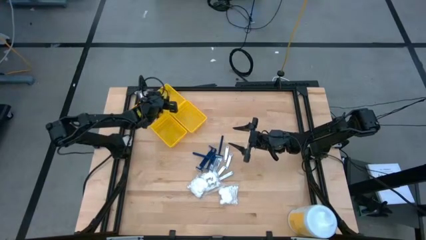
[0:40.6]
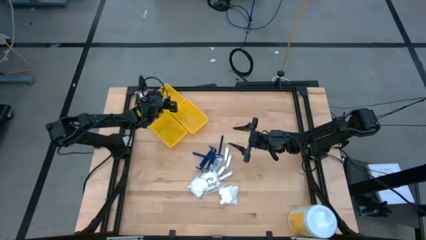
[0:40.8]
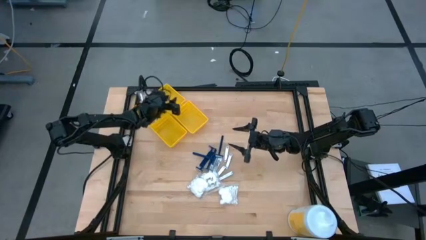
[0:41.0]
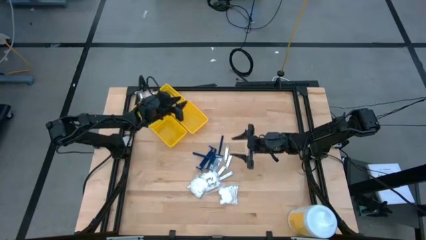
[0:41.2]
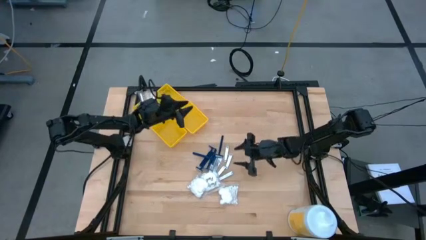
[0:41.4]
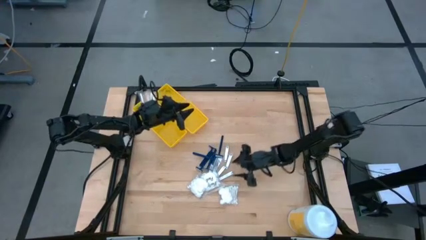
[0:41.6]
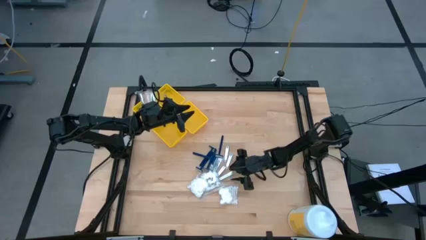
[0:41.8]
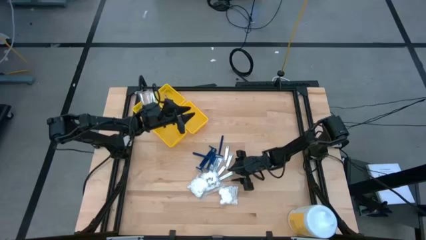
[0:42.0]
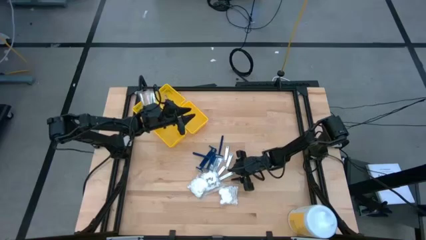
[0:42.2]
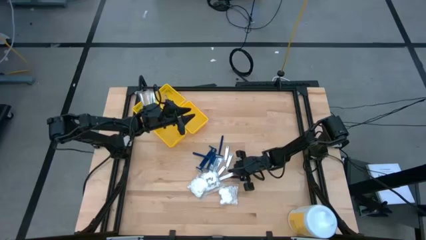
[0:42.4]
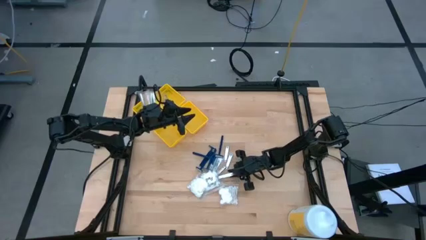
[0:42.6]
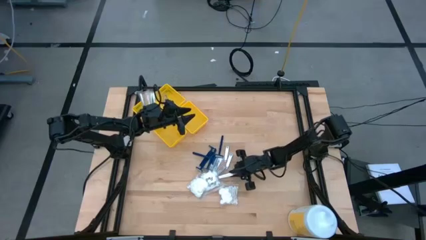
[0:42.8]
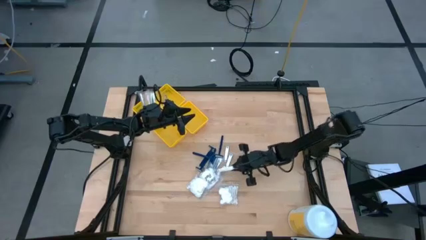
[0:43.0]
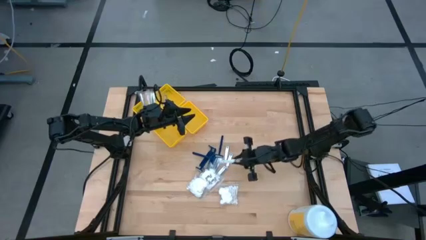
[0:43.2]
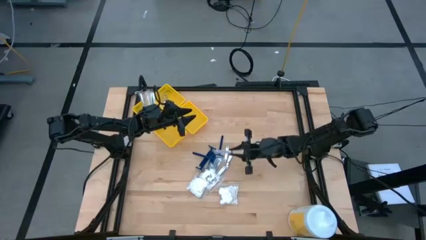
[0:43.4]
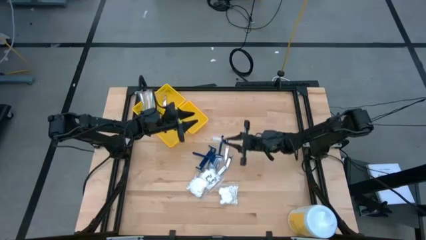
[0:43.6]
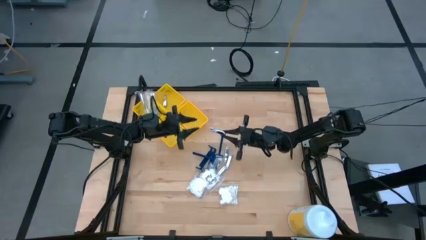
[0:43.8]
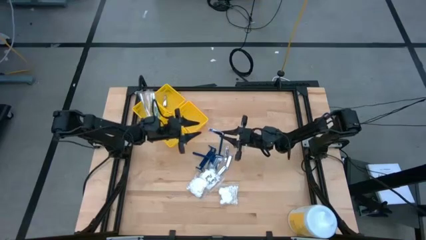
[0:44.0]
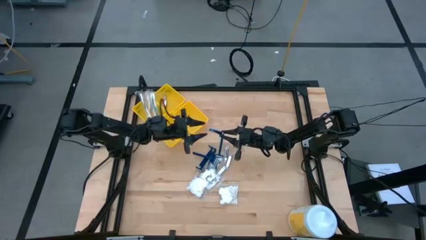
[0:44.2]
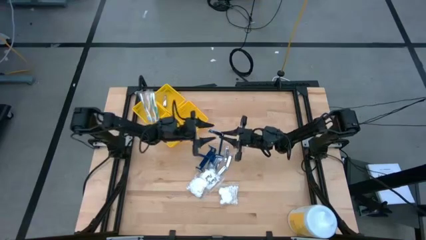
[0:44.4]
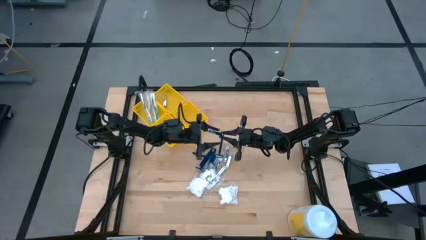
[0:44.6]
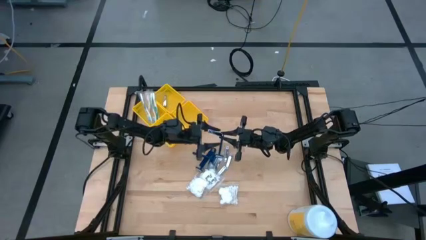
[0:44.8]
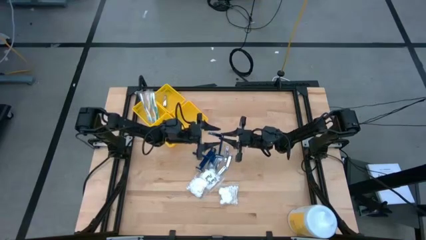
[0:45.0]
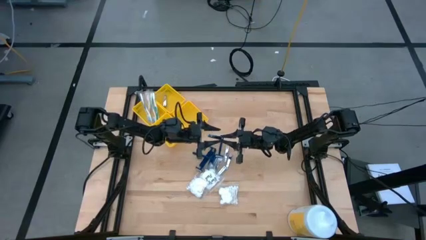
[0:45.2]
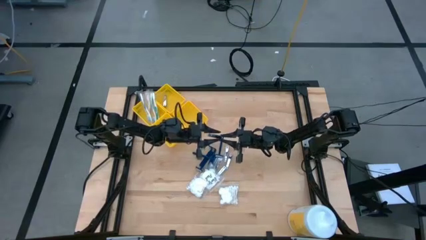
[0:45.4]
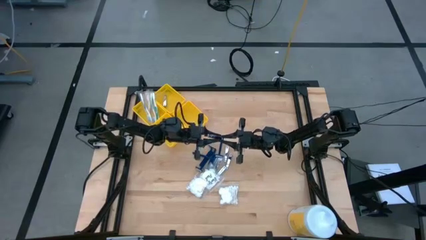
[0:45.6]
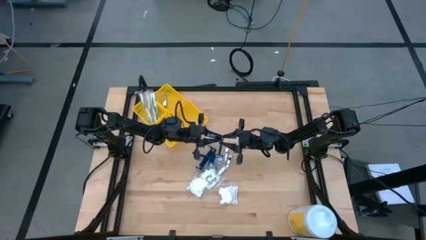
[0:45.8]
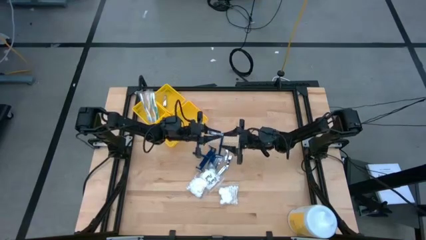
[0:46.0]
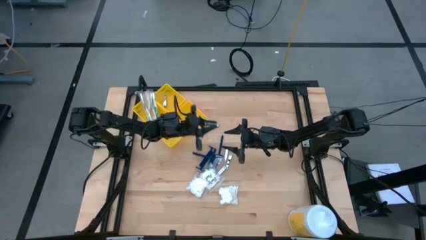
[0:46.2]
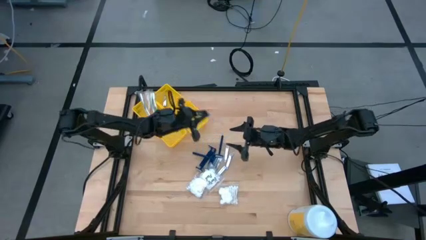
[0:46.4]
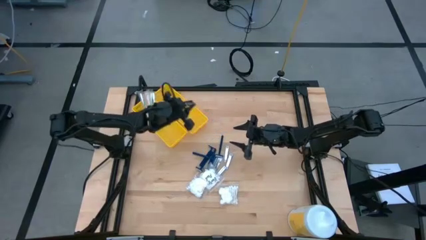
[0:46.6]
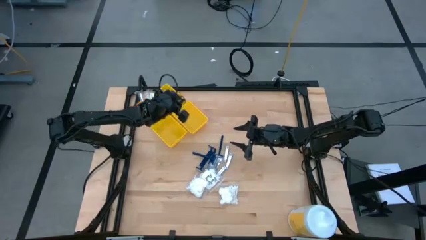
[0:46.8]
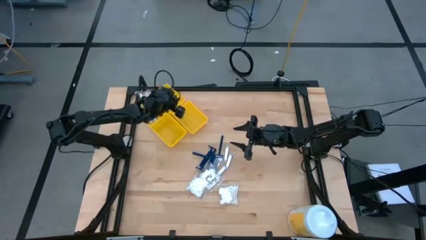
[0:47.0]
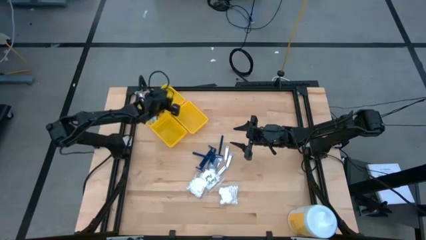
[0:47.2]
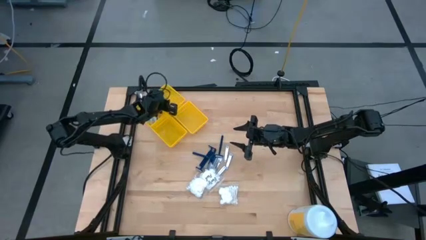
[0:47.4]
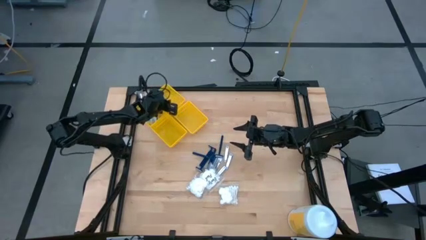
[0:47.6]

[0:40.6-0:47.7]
Task: Pick & Place Travel size toiletries
Put the silver nail cutter into the top yellow bin

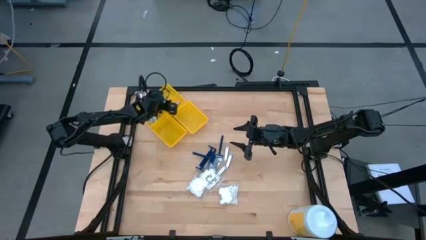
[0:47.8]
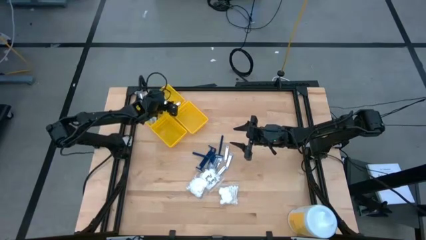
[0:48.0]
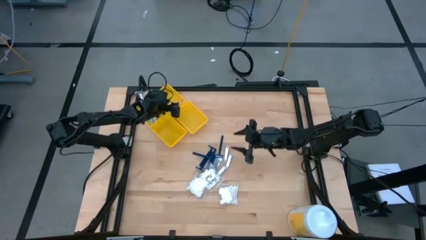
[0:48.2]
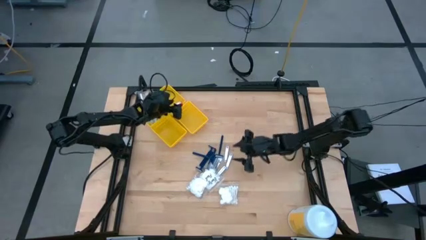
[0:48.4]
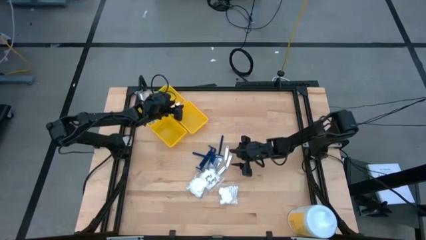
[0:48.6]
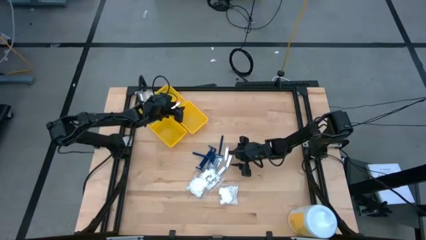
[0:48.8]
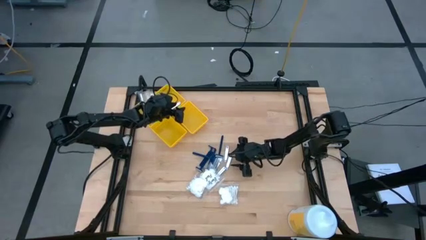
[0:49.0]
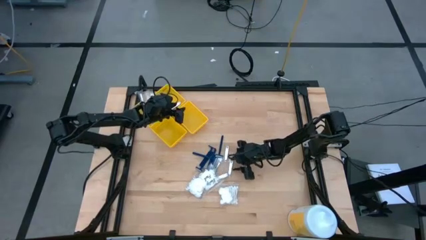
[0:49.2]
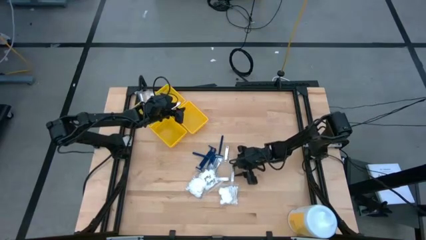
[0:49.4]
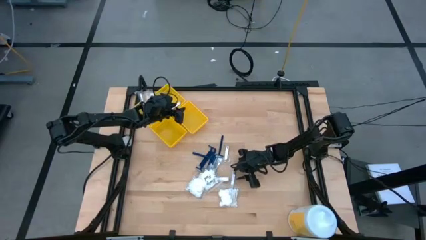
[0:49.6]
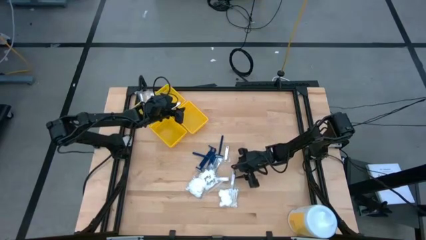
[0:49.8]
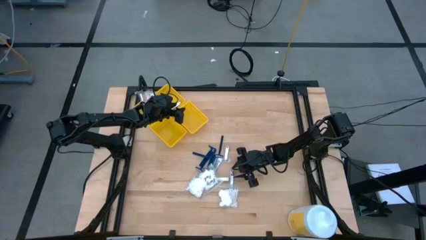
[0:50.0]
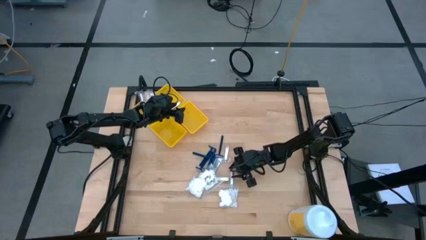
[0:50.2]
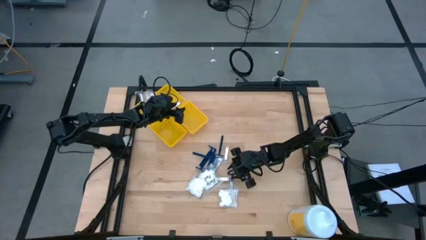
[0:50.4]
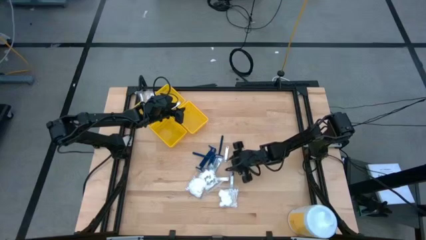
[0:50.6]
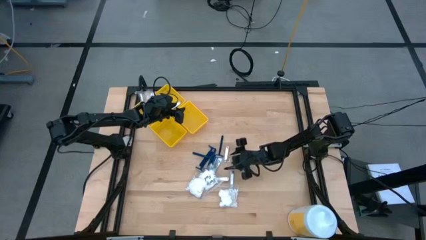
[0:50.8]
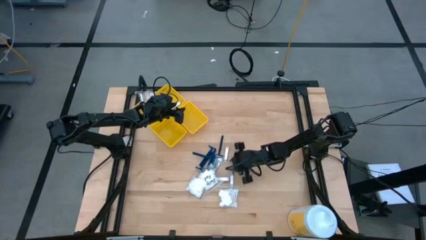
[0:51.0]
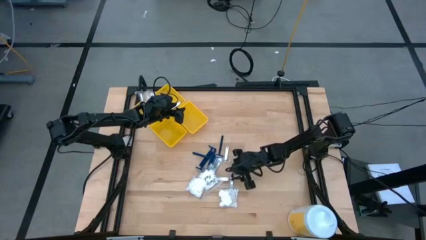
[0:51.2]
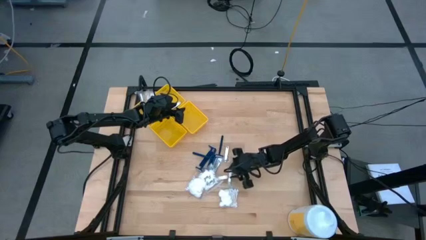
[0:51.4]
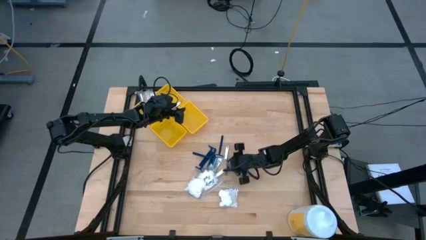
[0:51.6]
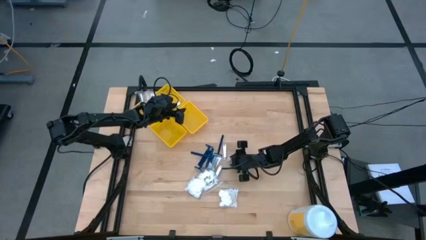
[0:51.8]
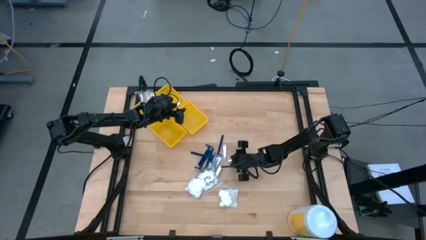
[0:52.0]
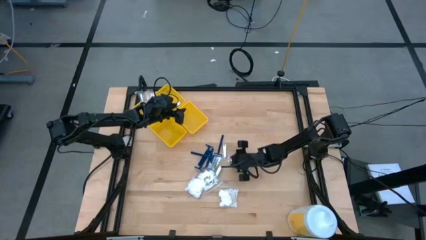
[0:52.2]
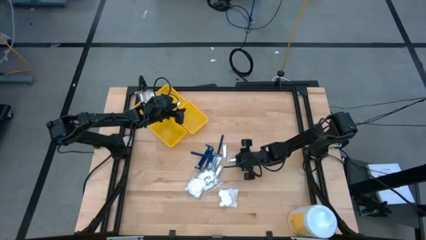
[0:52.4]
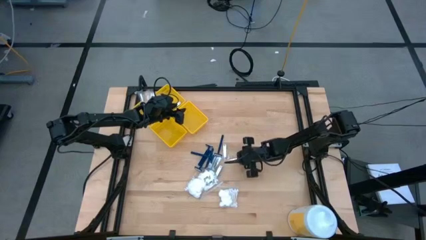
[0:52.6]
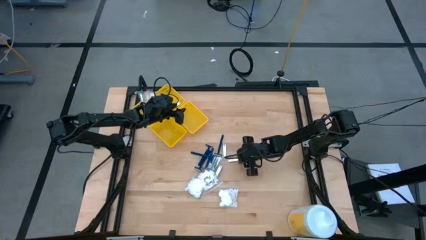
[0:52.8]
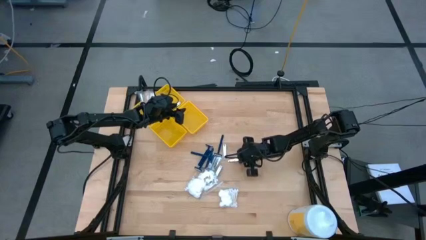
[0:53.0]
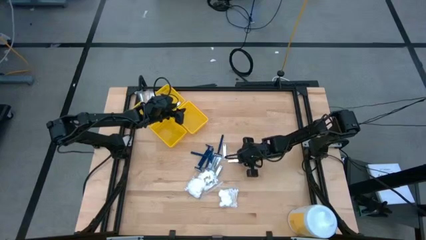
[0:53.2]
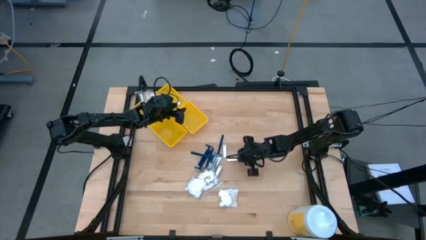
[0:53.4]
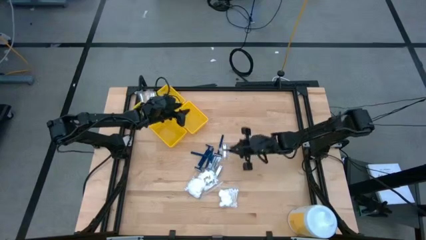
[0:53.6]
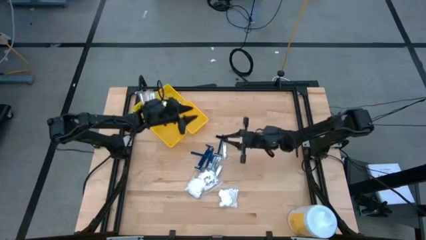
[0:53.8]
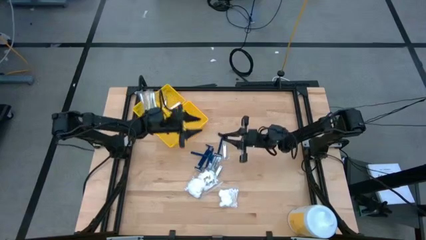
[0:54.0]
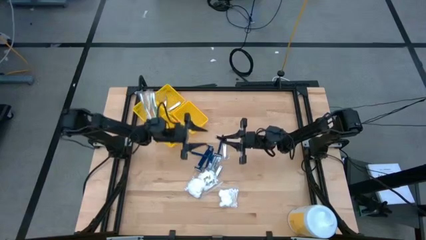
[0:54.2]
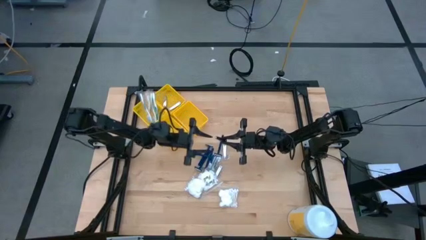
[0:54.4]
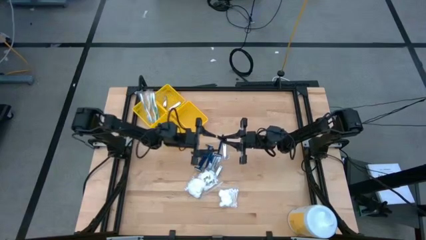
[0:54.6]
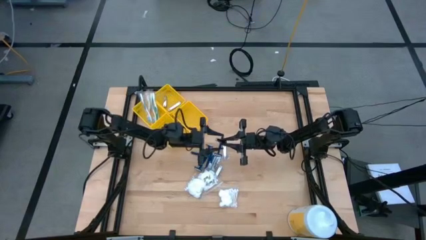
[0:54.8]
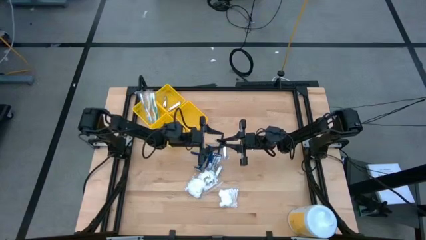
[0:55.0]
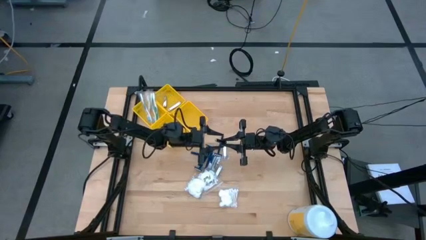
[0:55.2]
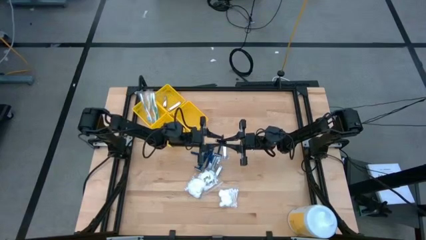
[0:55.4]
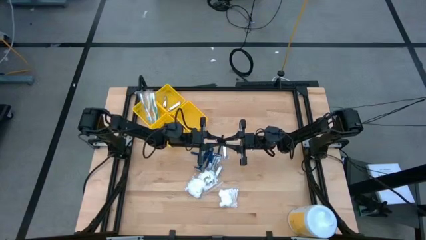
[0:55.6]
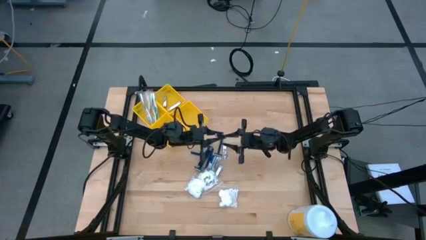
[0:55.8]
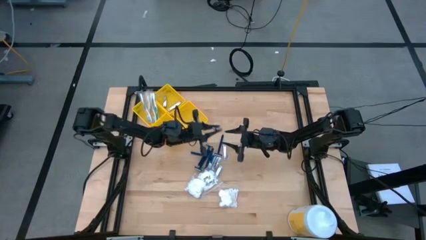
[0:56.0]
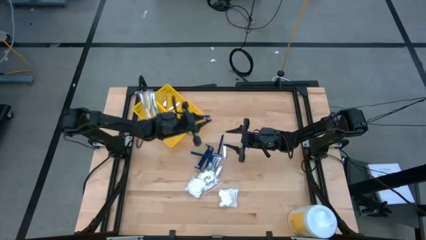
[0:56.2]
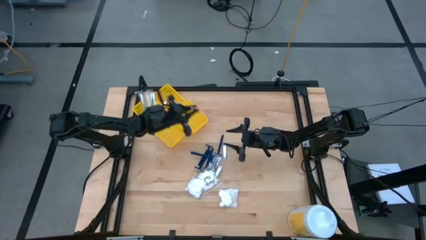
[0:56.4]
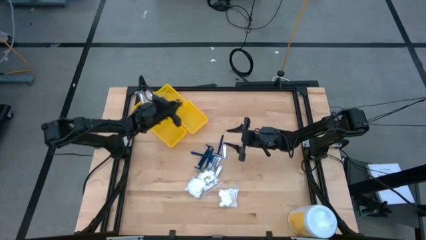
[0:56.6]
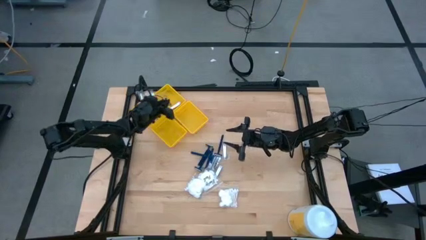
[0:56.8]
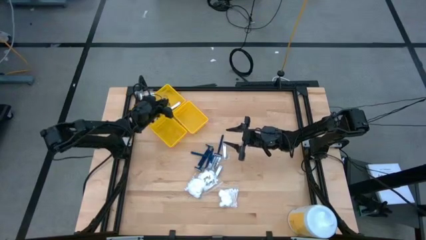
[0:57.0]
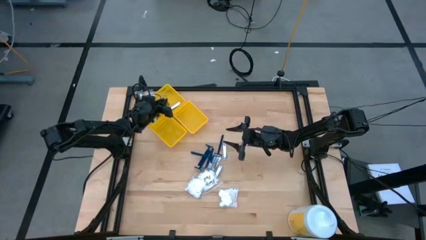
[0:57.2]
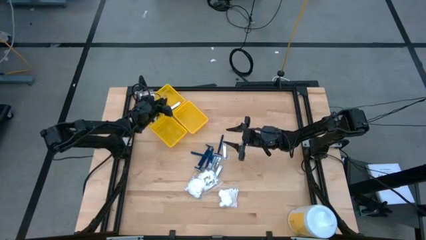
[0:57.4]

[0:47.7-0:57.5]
Put the silver nail cutter into the top yellow bin
